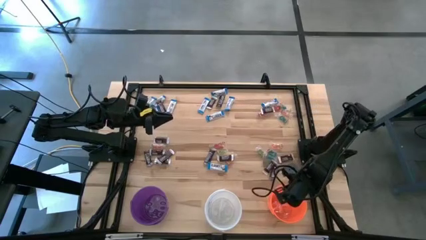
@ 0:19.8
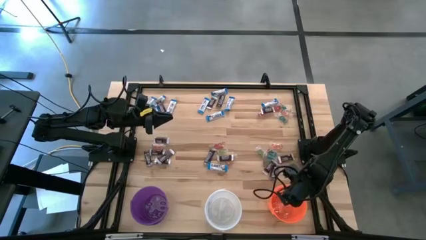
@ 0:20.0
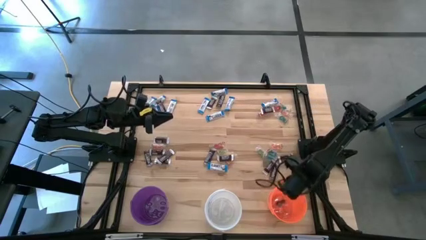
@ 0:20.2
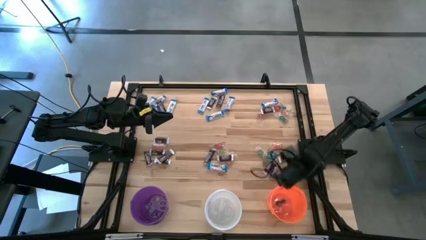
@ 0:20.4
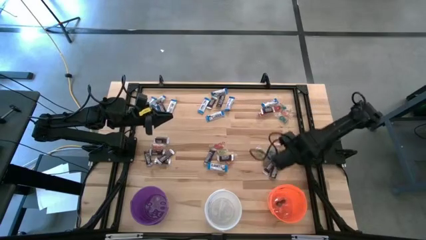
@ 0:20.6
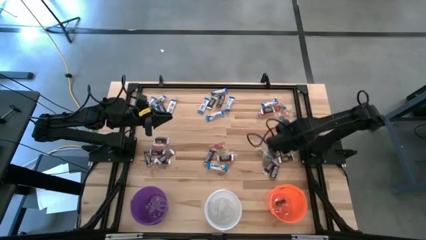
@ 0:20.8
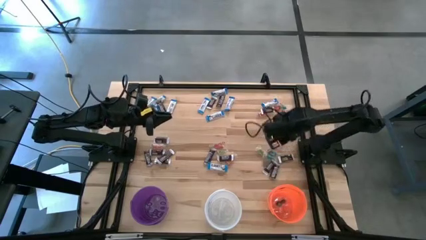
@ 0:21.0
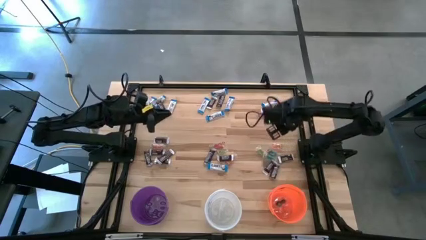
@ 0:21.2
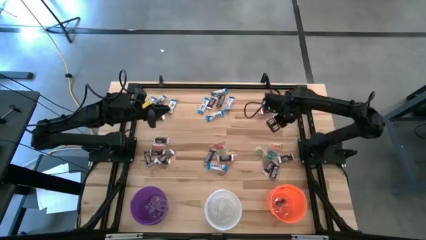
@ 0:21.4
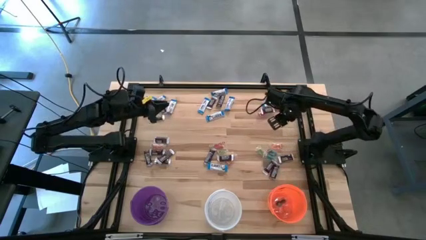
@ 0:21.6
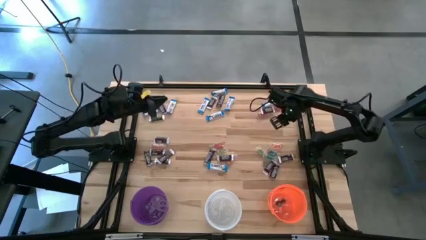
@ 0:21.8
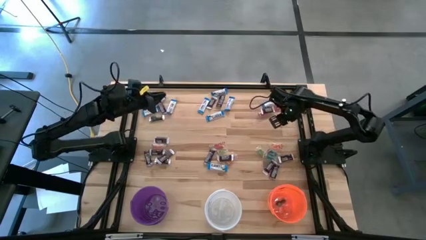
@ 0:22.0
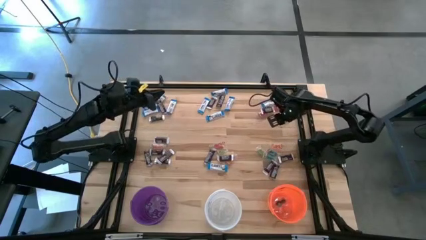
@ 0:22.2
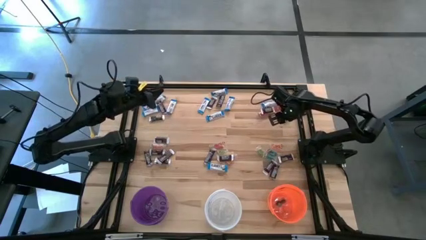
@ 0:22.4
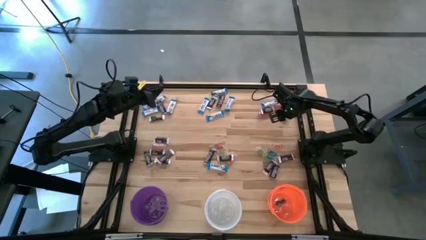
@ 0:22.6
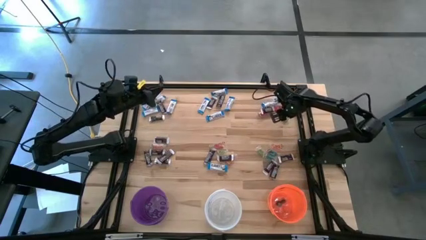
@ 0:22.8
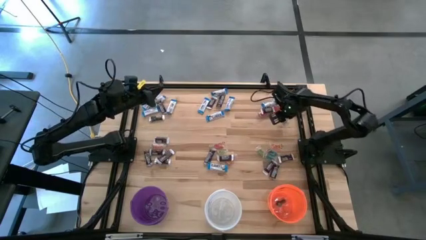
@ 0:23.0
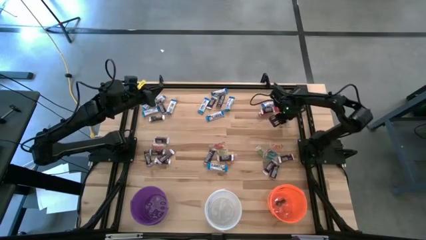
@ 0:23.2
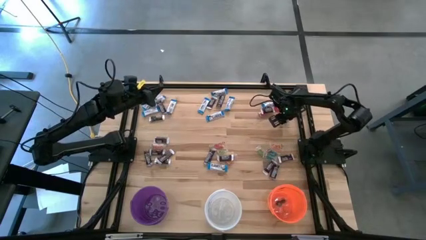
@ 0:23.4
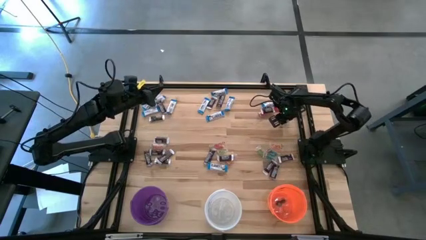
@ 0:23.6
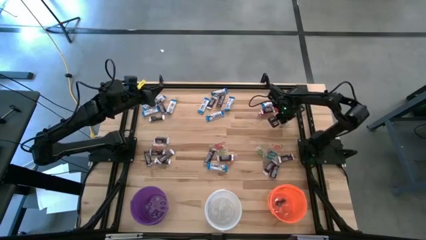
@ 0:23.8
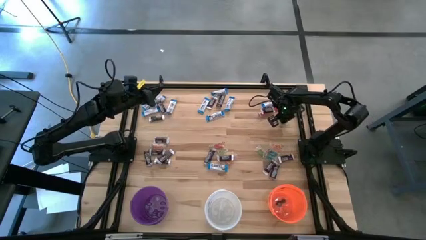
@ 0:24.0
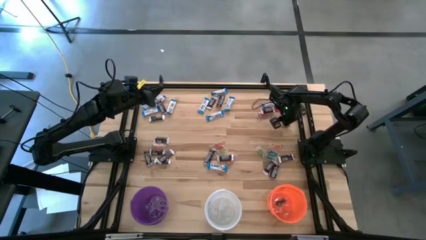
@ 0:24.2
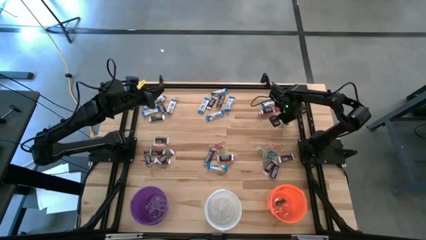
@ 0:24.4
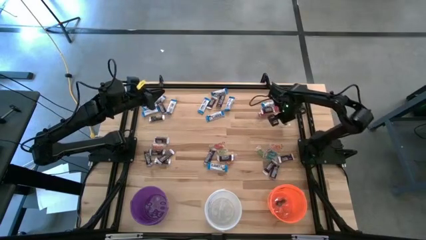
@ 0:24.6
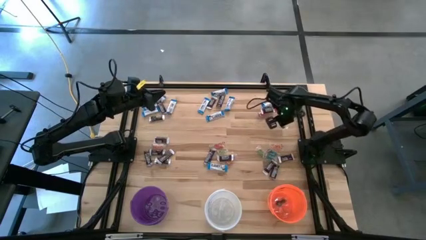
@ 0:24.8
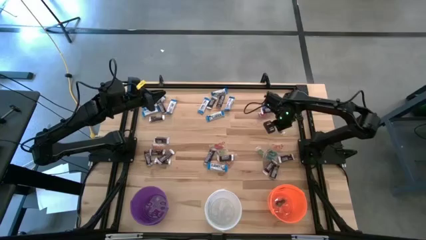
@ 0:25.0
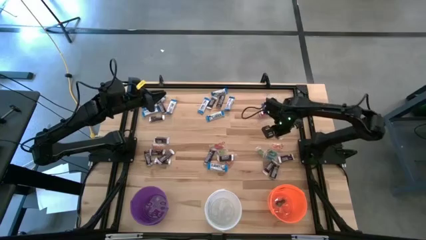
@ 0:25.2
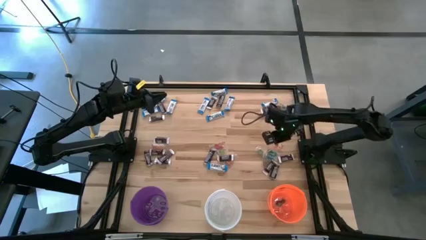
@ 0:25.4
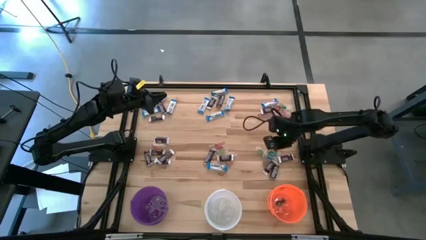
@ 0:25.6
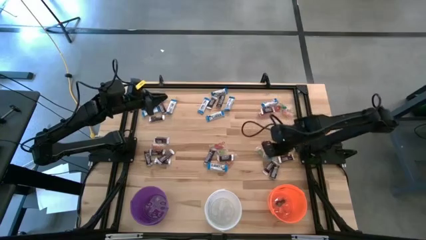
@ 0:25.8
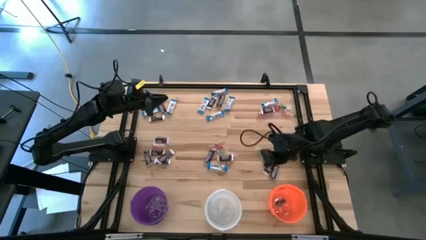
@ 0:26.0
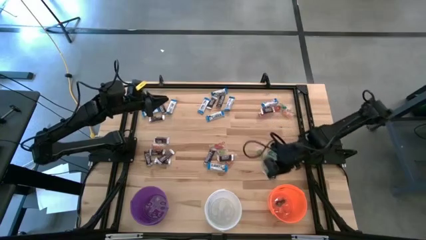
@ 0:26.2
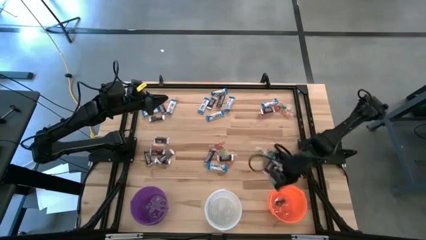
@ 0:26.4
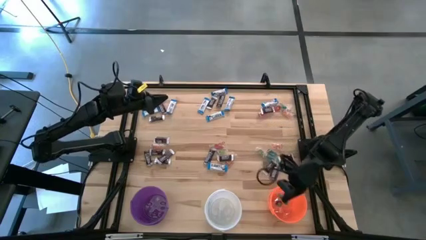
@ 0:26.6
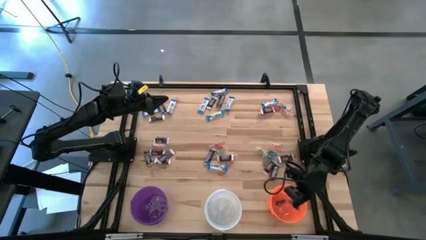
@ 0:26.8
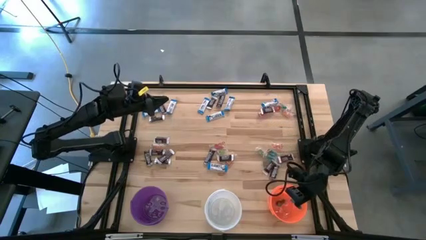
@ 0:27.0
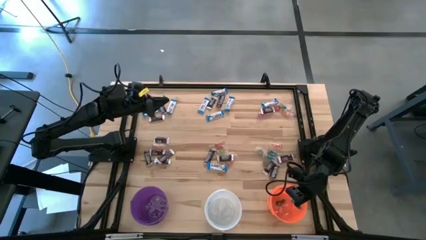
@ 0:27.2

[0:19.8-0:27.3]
Task: Sort candy
Put the blue gummy into the orange bucket

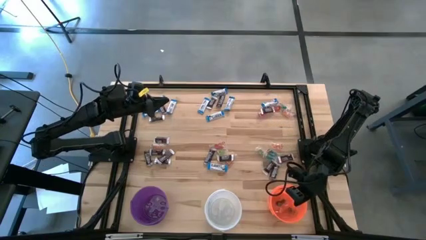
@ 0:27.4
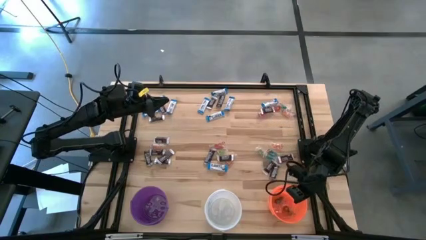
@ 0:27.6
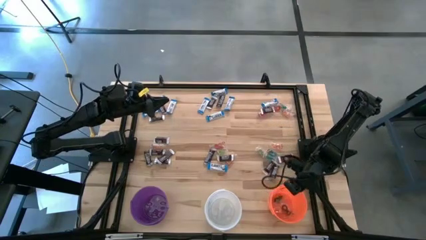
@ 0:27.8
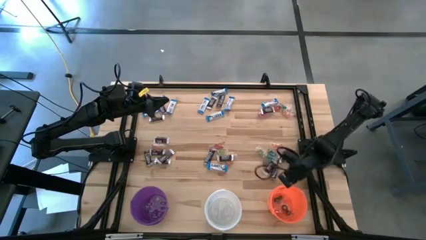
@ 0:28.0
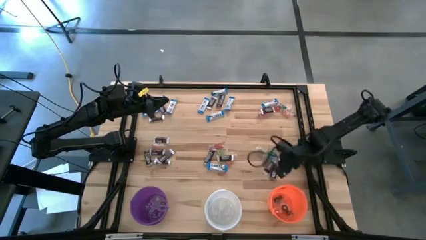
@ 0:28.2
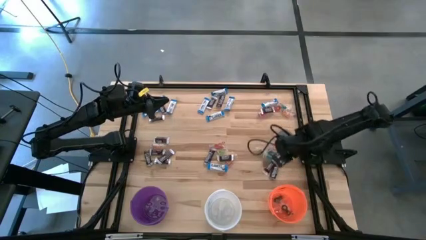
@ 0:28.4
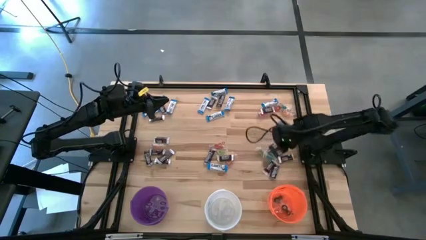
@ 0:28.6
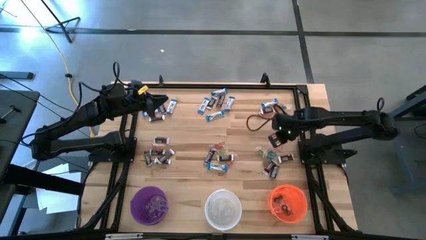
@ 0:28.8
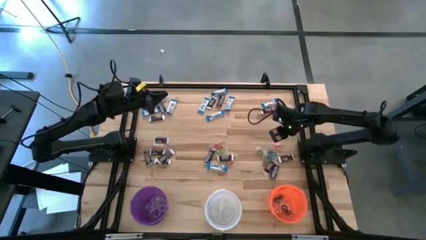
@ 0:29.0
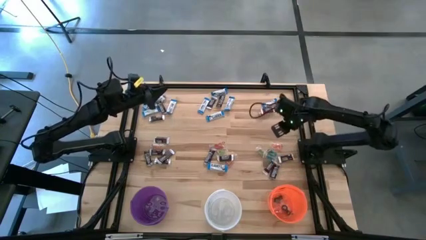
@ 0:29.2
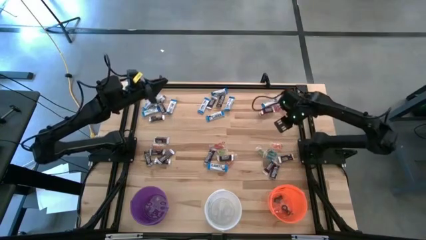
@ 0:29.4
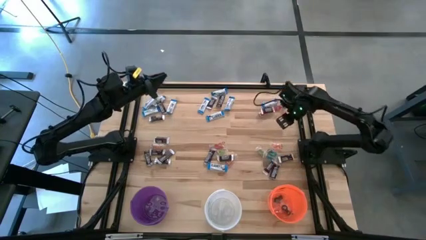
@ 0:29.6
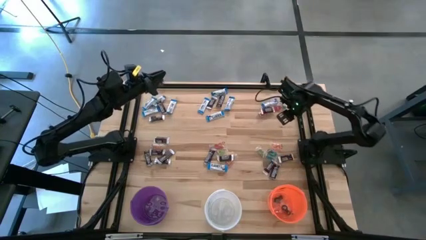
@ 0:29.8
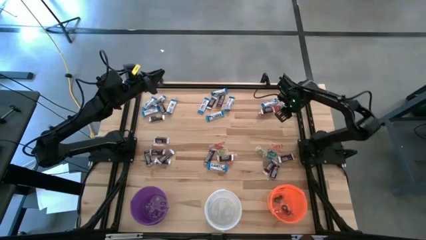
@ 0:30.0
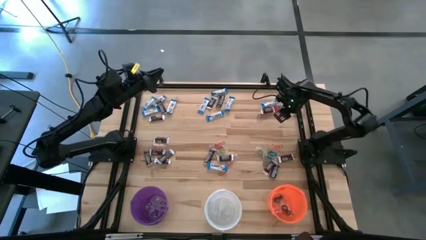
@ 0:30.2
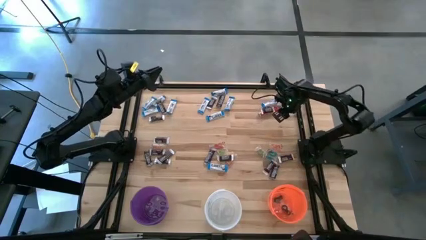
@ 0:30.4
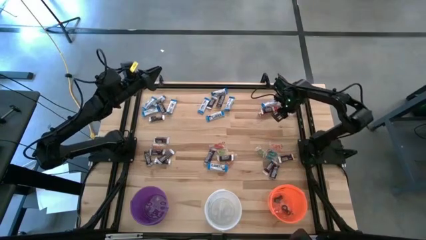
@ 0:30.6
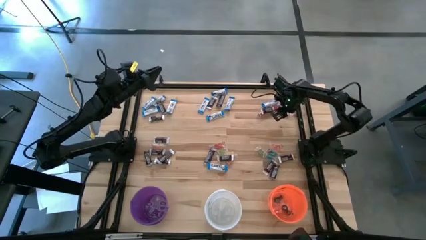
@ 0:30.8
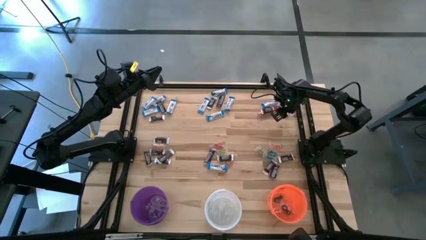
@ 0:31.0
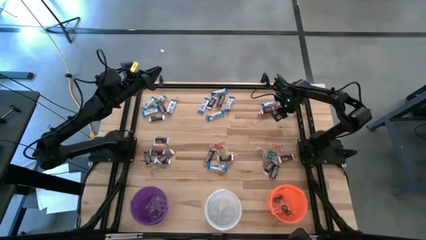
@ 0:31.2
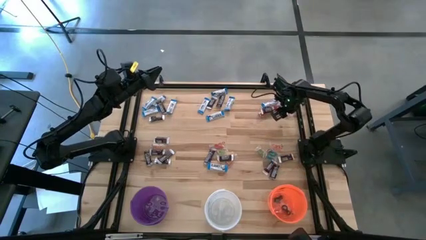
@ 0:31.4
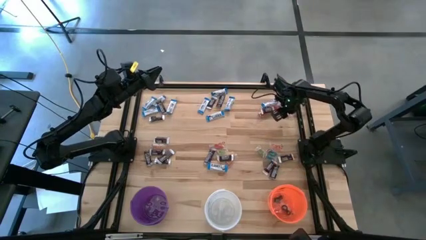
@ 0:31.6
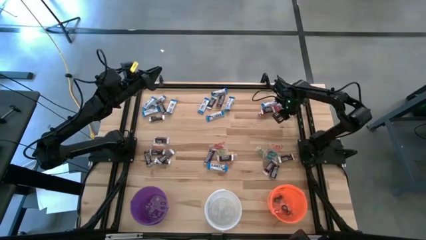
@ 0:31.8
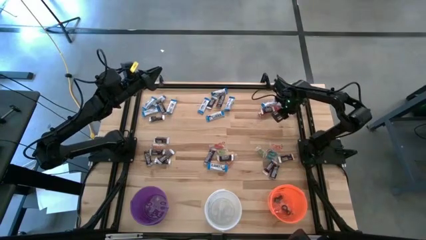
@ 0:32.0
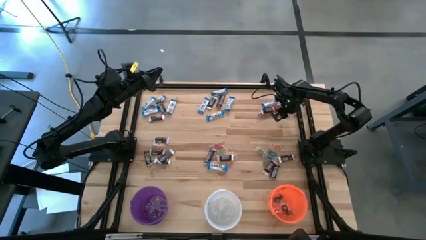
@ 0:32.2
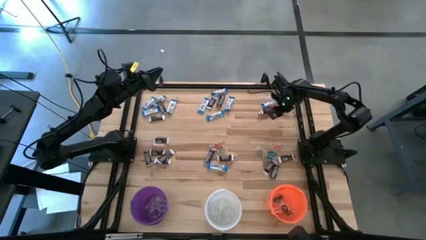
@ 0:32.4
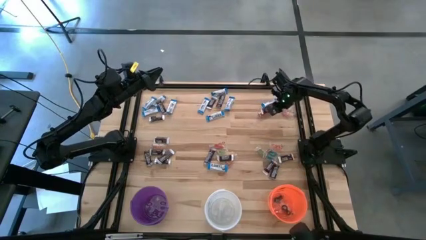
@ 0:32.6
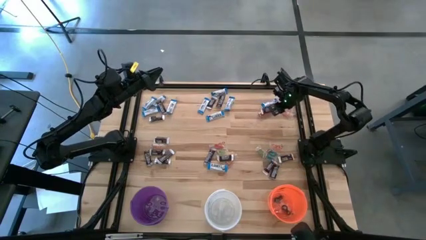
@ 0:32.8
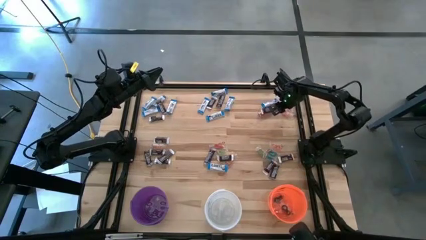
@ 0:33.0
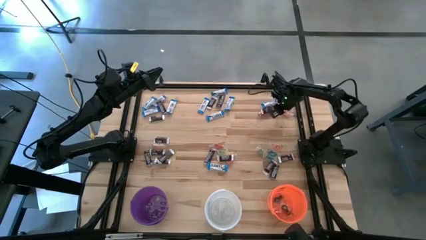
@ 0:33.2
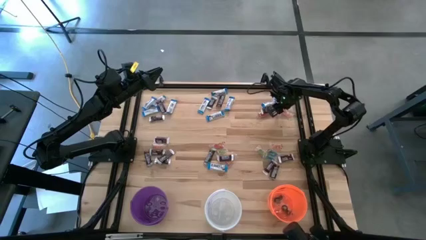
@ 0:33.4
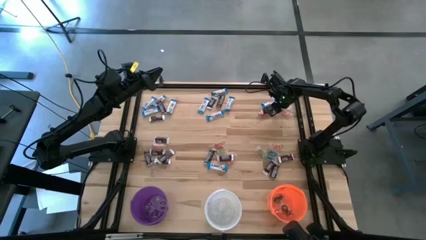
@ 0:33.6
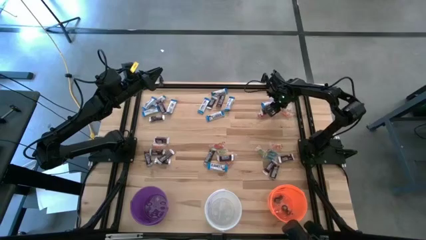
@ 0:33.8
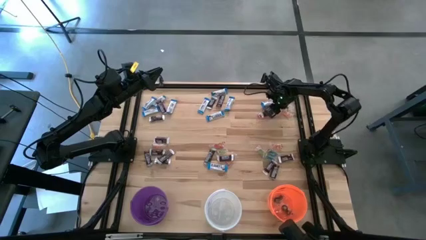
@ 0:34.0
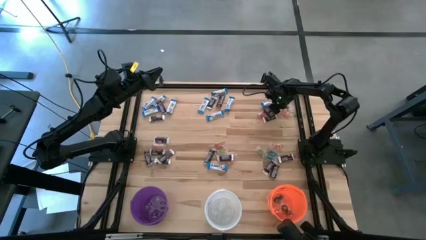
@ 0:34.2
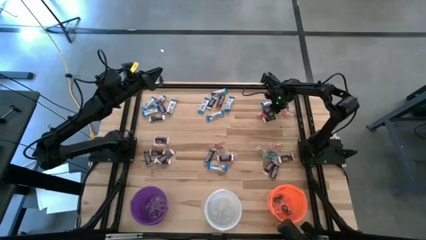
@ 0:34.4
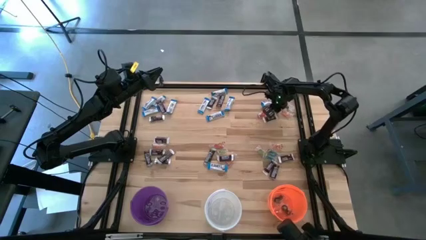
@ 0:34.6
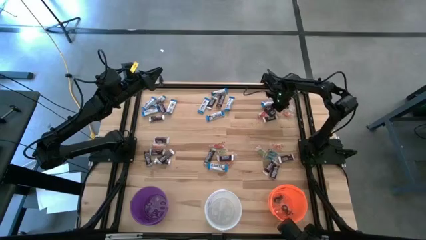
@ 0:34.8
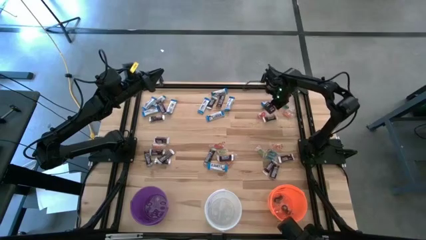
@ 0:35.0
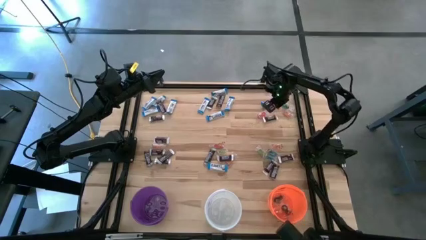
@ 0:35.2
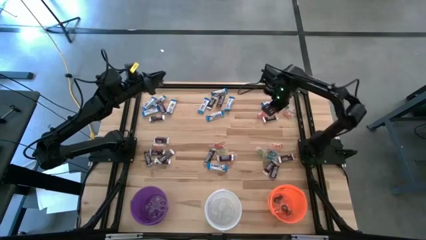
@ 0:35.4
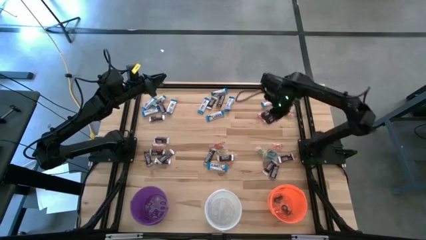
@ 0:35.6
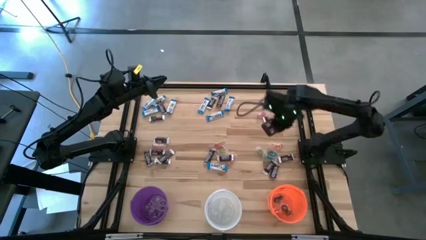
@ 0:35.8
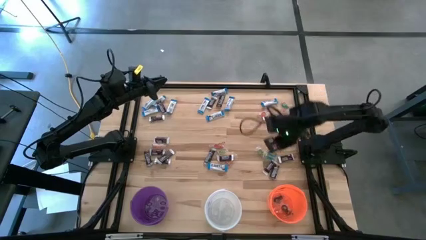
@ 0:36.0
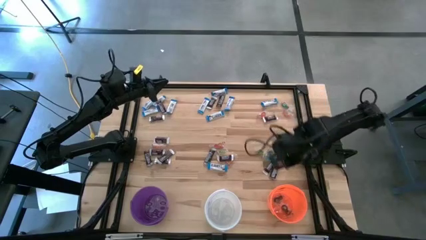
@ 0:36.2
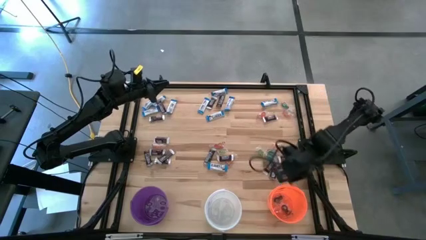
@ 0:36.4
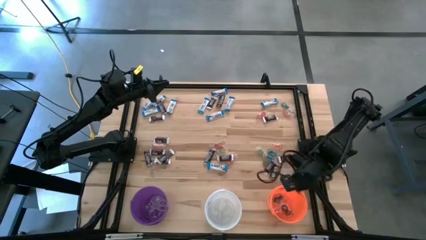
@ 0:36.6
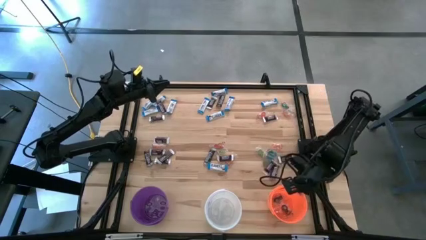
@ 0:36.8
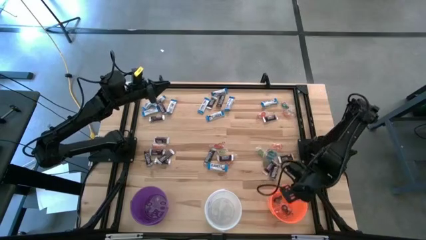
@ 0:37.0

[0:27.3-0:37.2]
Put the red gummy into the orange bucket
